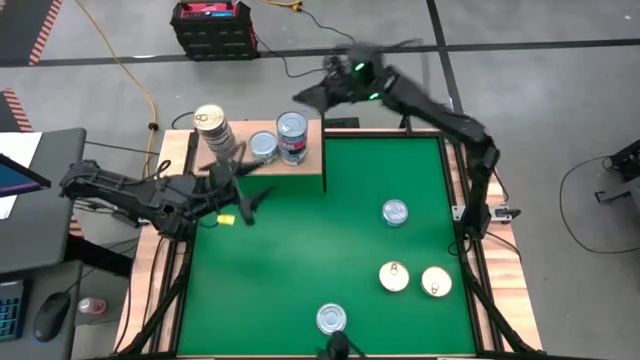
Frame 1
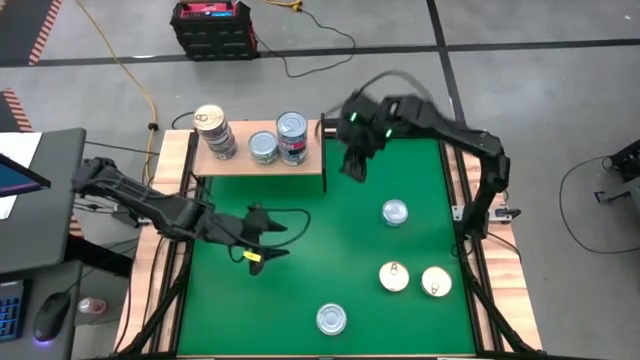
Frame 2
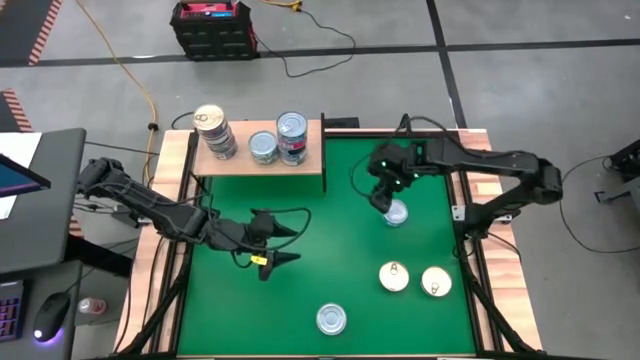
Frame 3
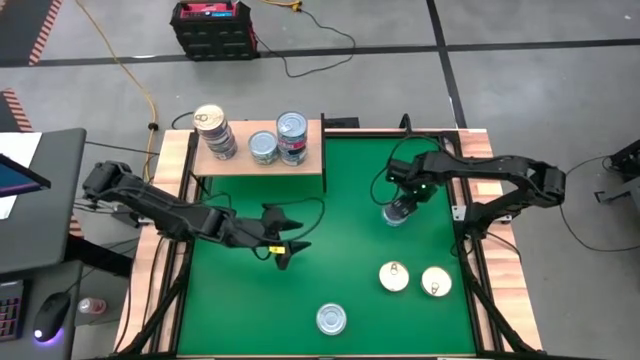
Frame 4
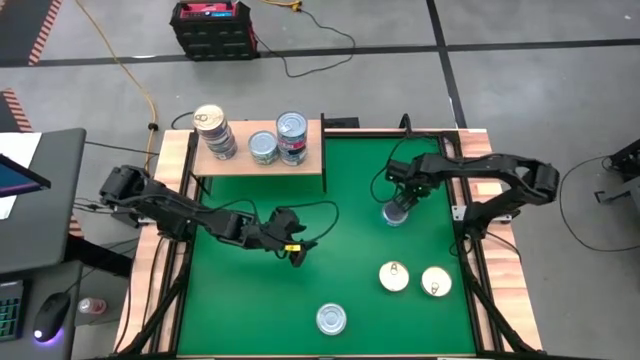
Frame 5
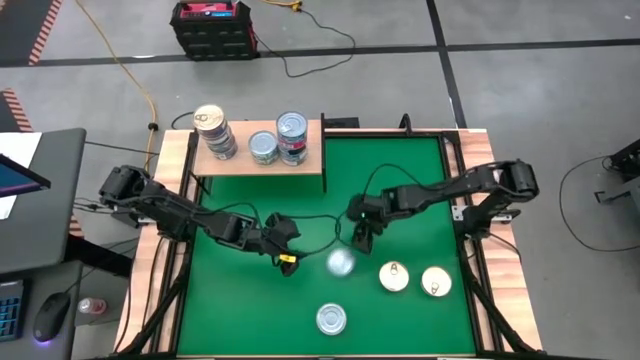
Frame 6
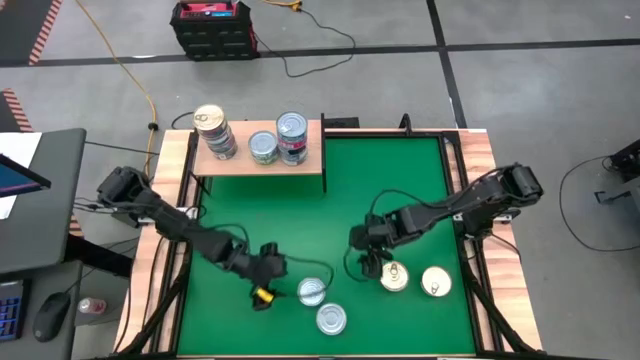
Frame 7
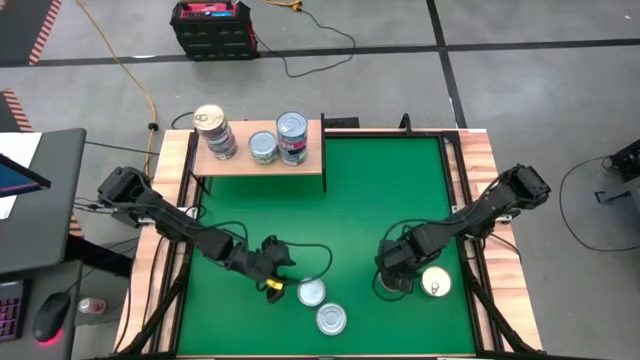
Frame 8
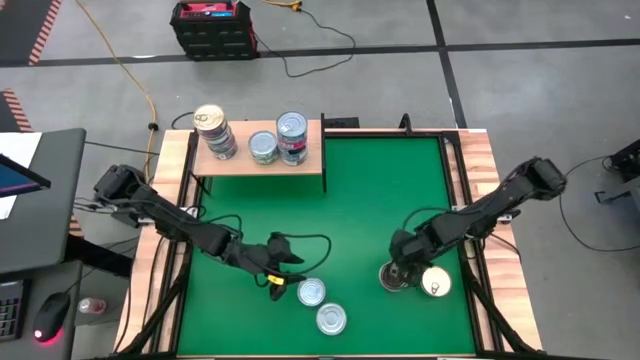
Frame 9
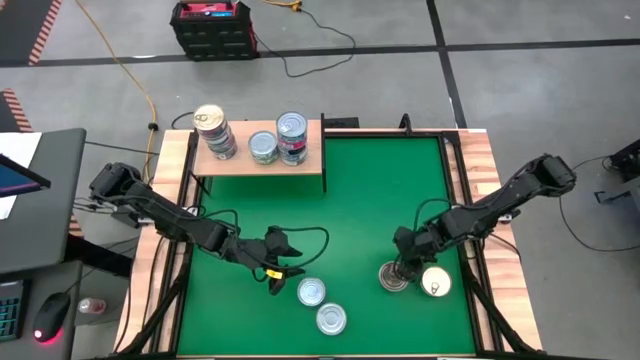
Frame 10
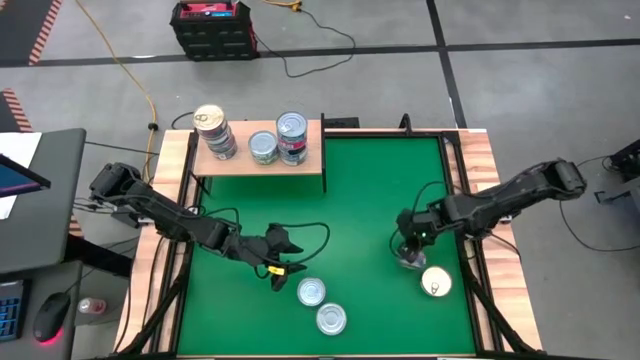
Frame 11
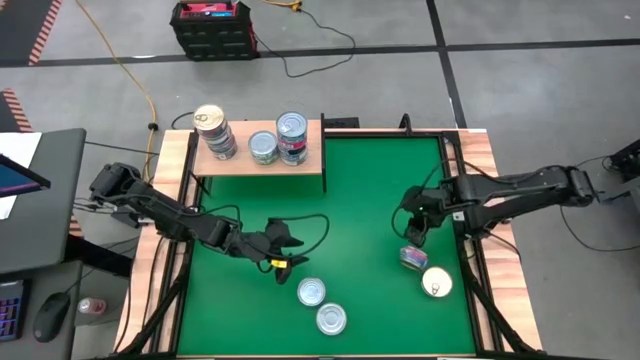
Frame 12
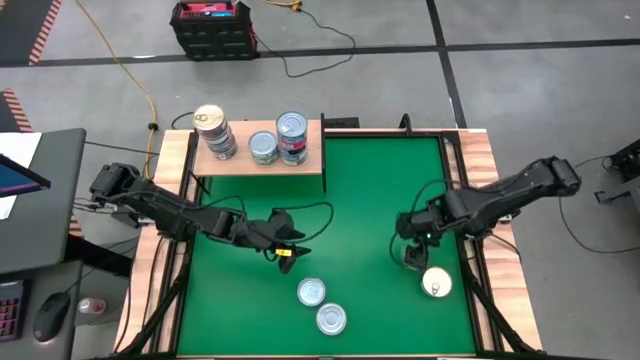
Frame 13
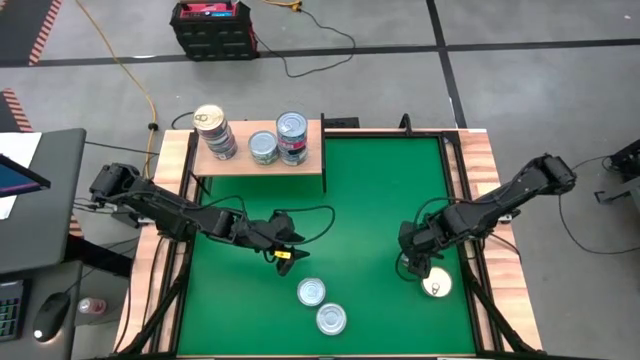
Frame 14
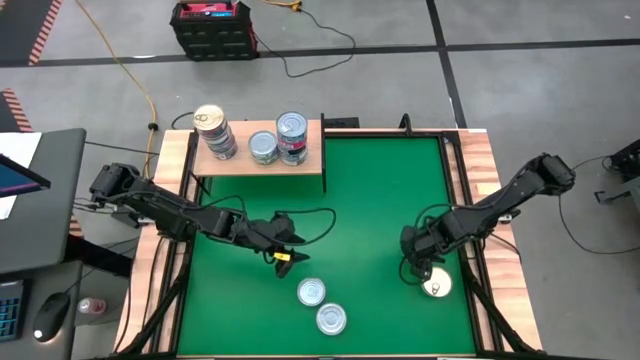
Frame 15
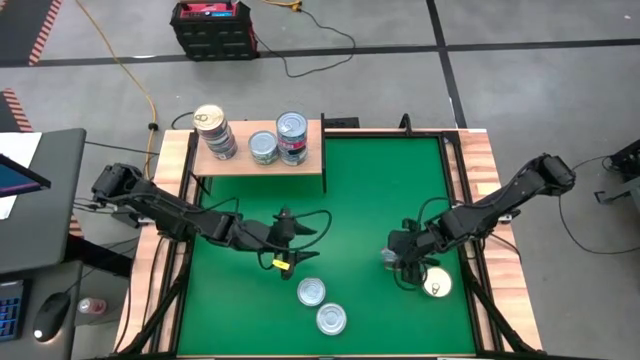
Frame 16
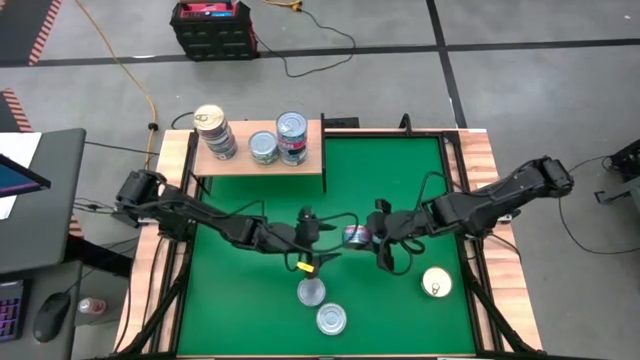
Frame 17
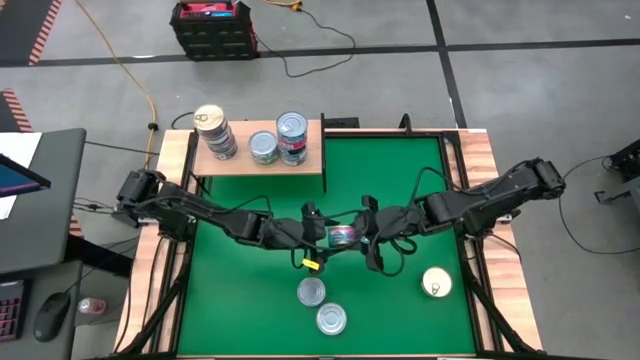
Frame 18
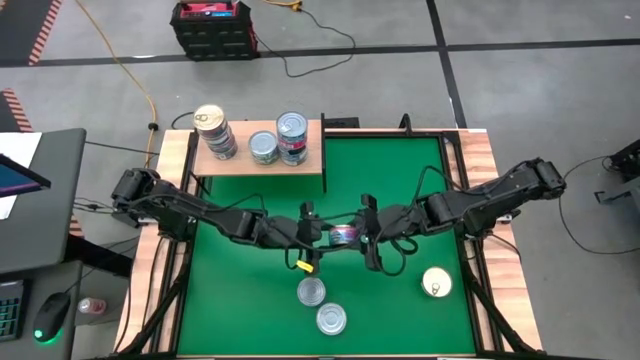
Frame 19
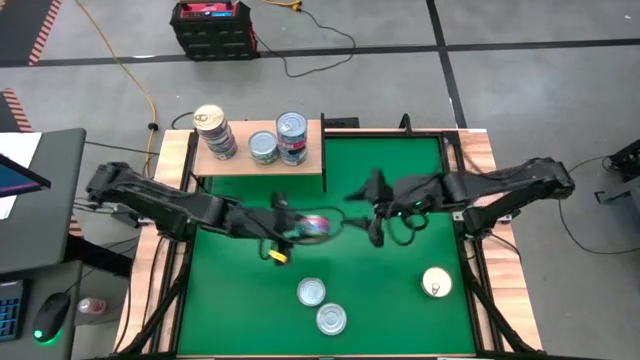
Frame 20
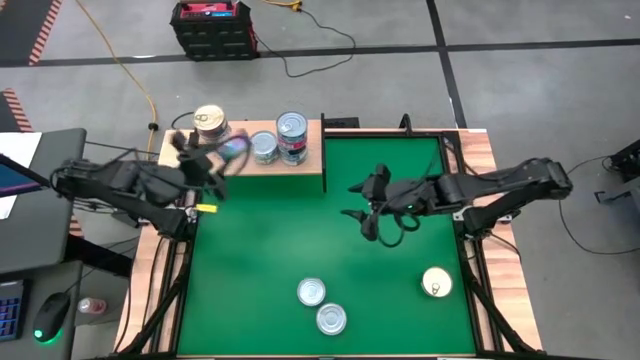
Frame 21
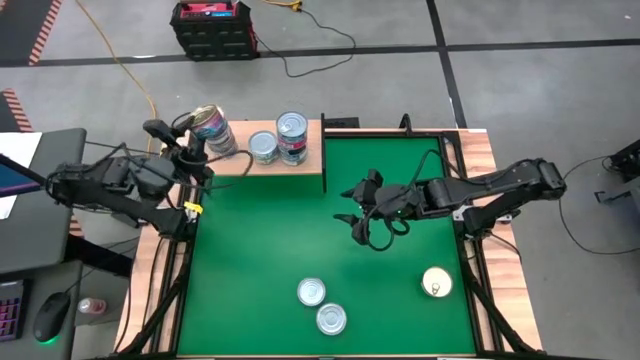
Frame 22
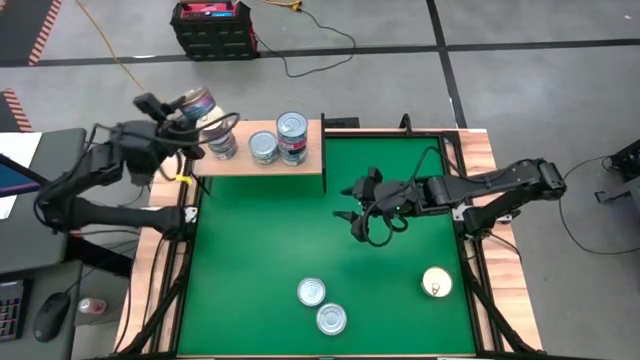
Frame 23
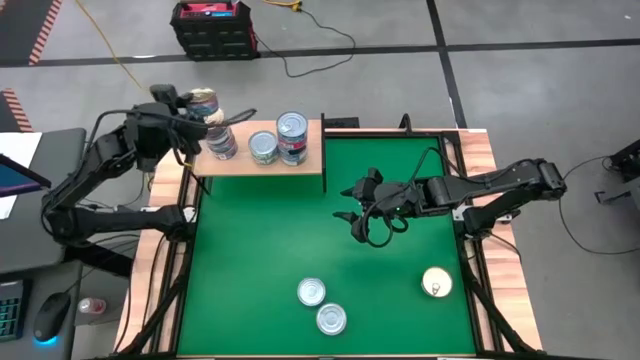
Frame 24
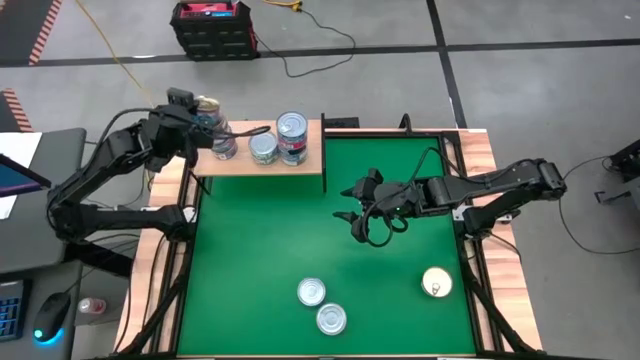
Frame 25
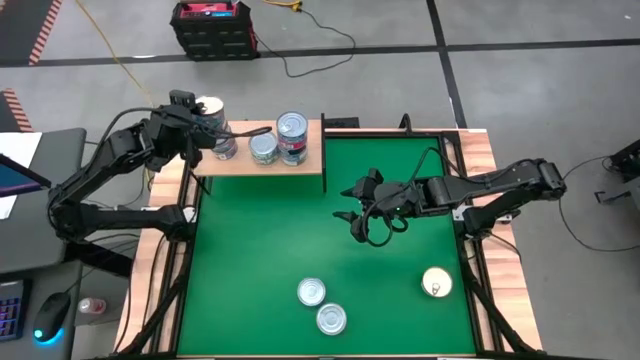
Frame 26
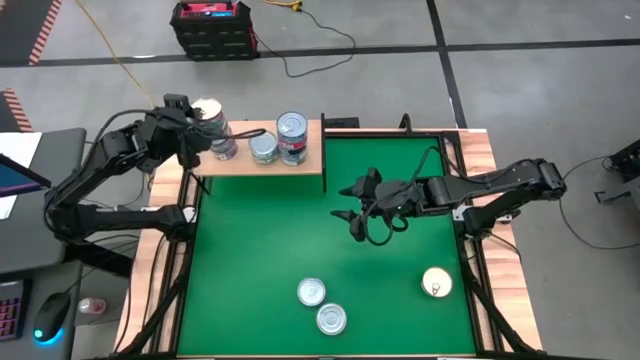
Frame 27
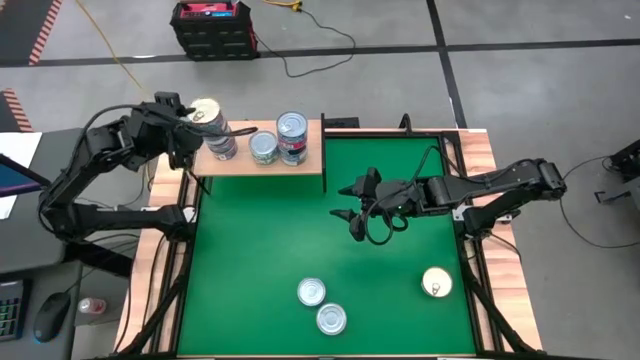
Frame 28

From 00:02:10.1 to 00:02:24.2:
Task: Stack canned seafood by type on shelf
Stack the blue and pink tuna can on top of the blue and pink tuna cans on the shelf

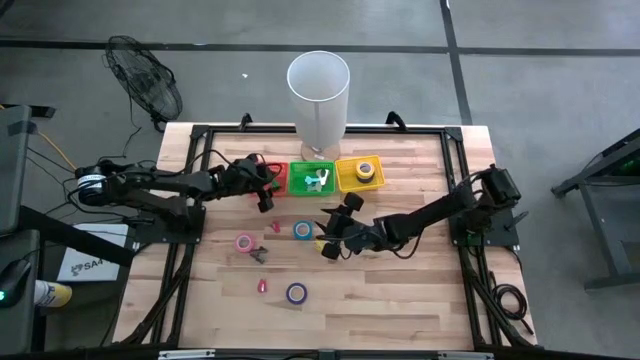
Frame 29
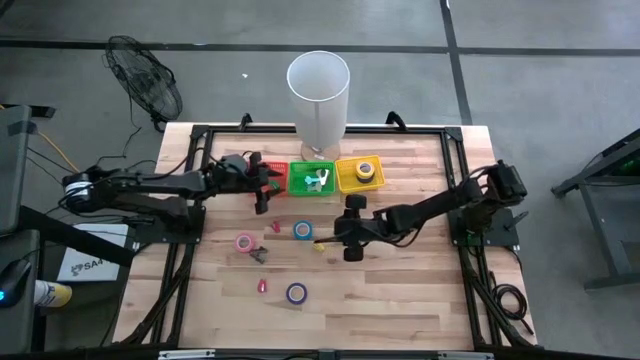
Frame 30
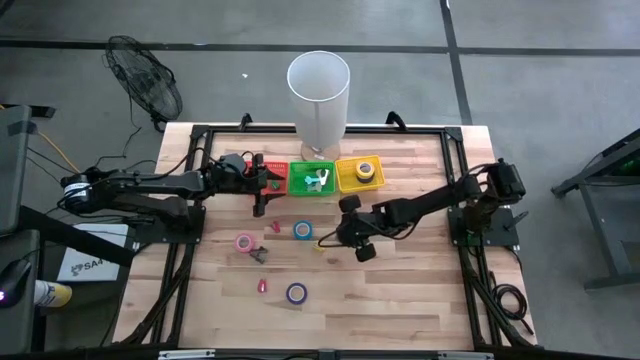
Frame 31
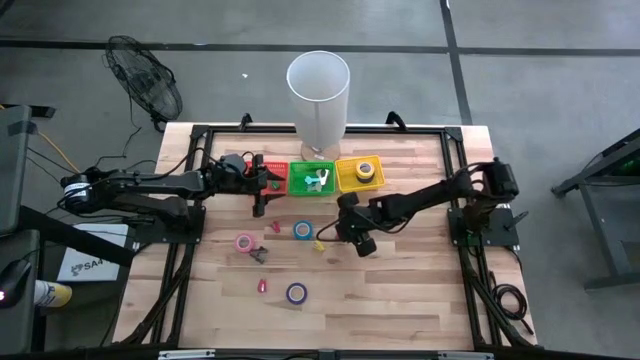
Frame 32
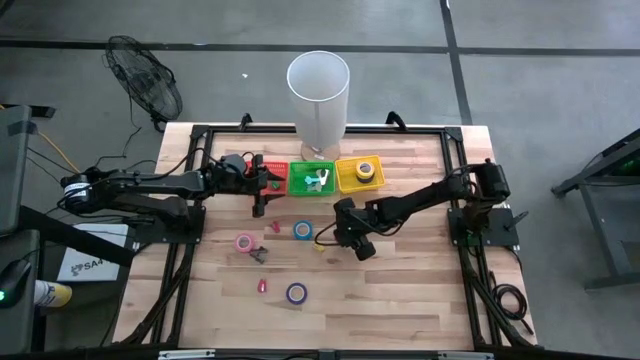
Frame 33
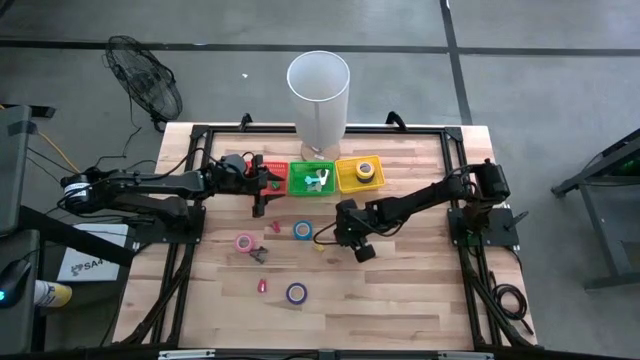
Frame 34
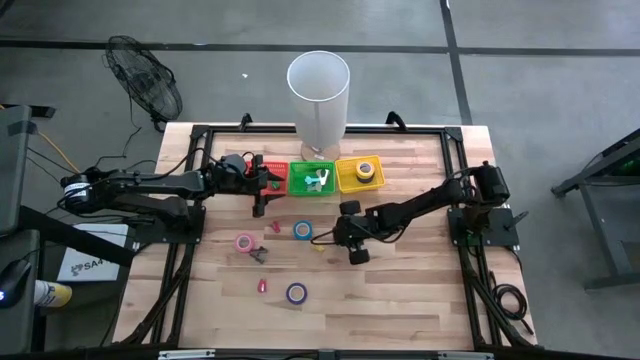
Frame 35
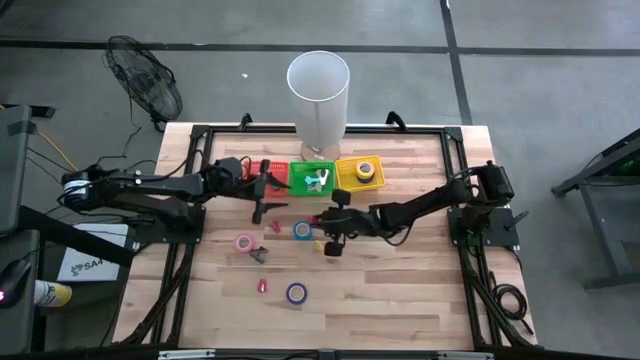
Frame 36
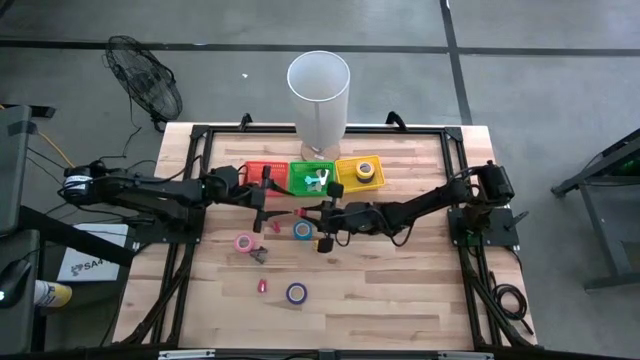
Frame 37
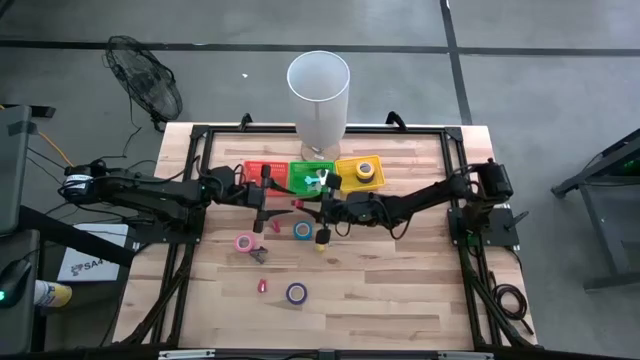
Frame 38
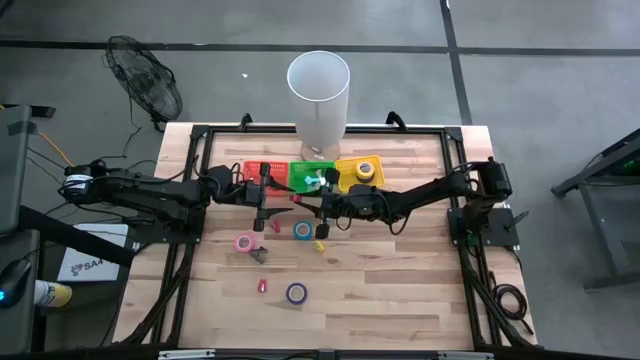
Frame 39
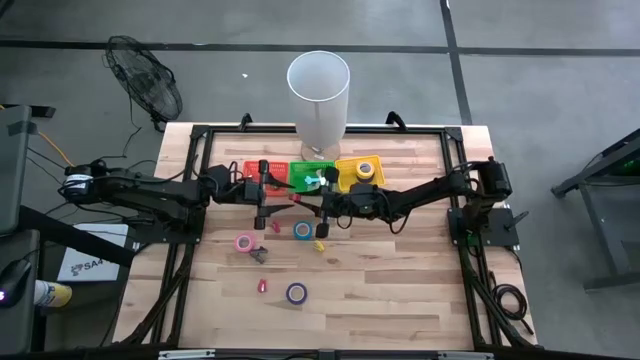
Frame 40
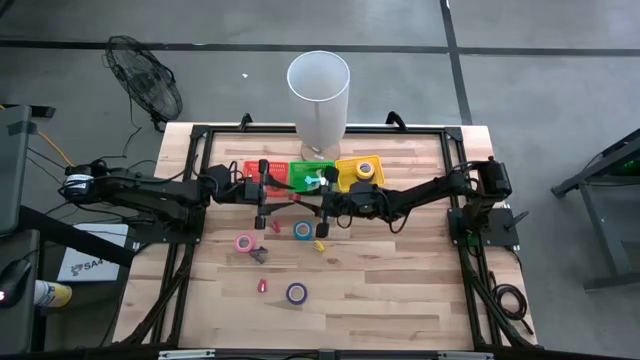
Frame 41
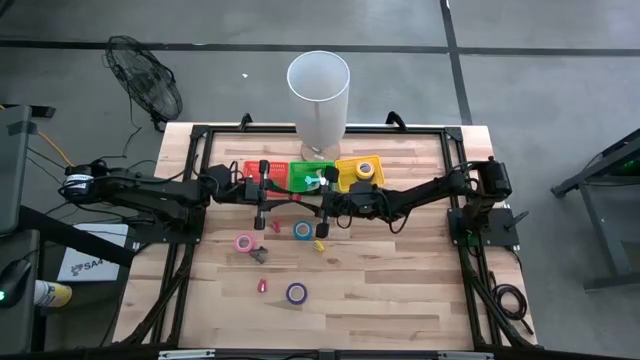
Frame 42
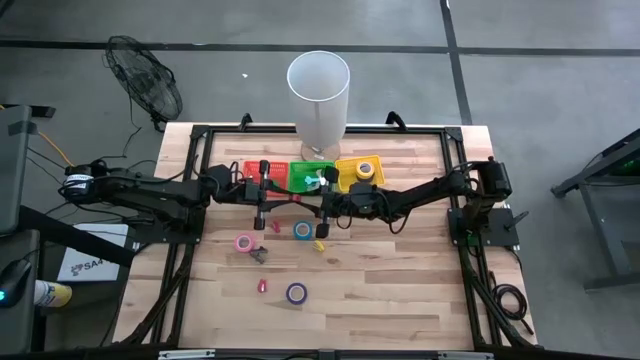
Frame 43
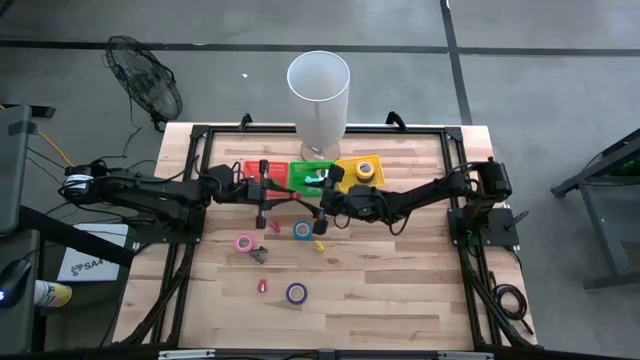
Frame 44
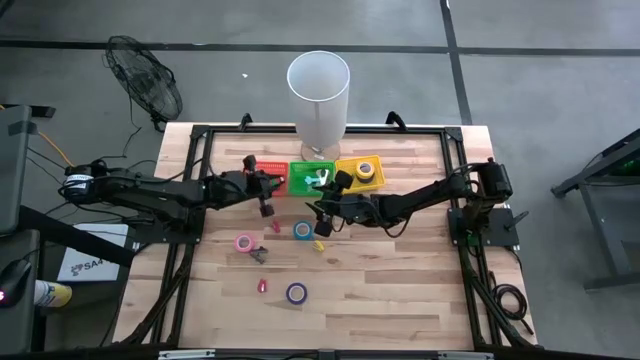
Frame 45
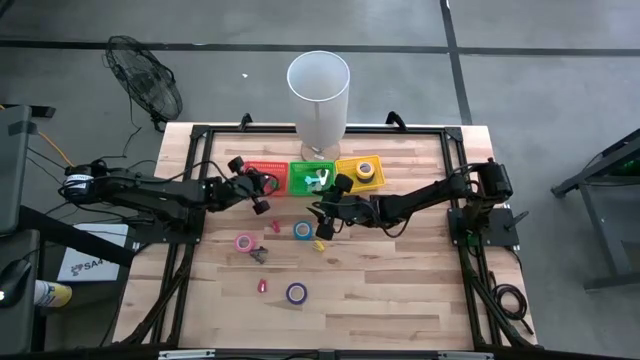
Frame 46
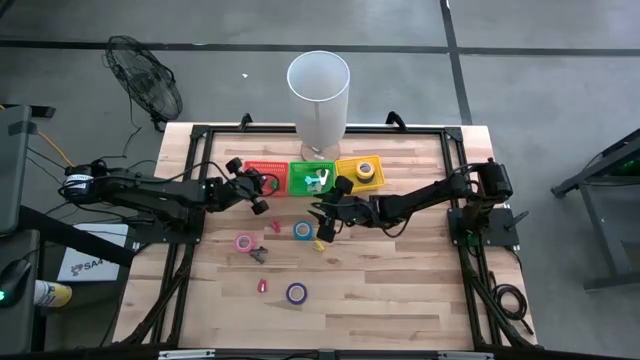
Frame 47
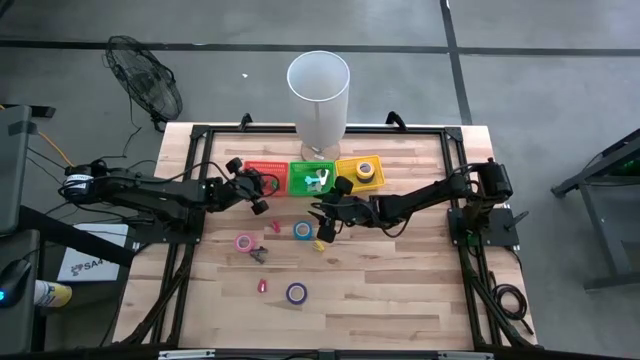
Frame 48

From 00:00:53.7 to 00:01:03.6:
Task: Pick and place Stapler, Stapler remover, tape
Put the red stapler into the orange bin
